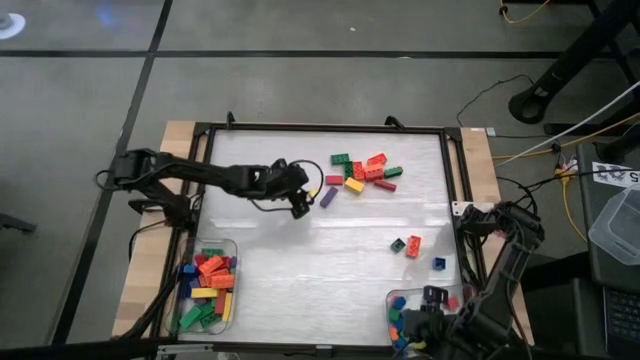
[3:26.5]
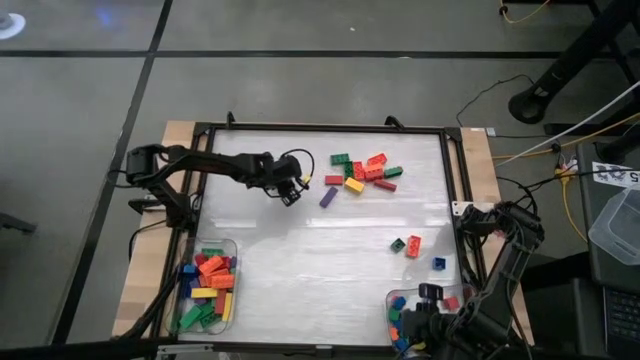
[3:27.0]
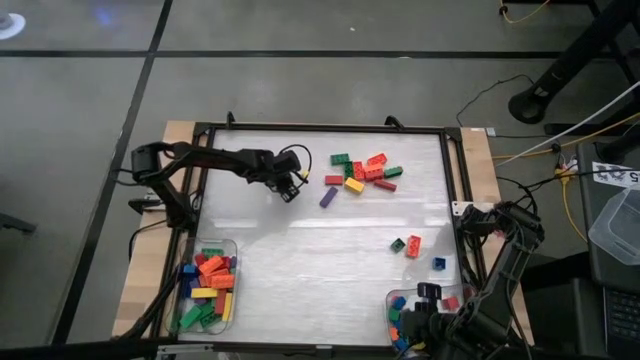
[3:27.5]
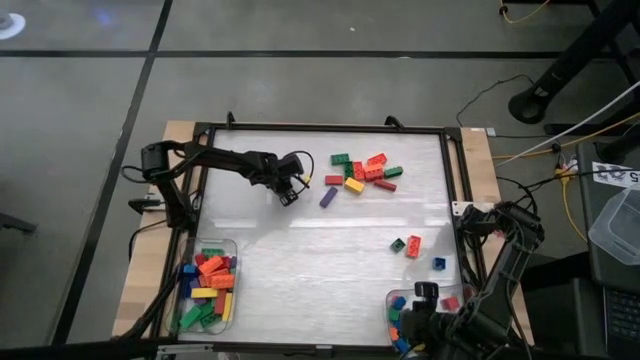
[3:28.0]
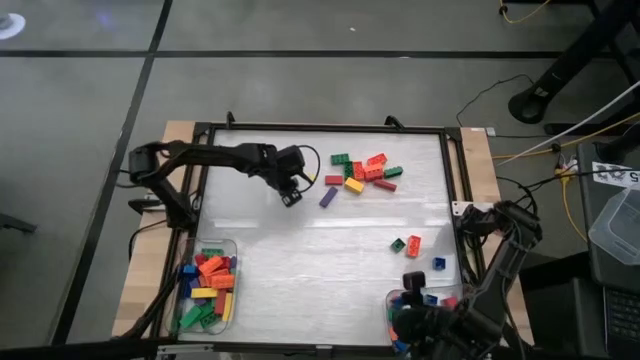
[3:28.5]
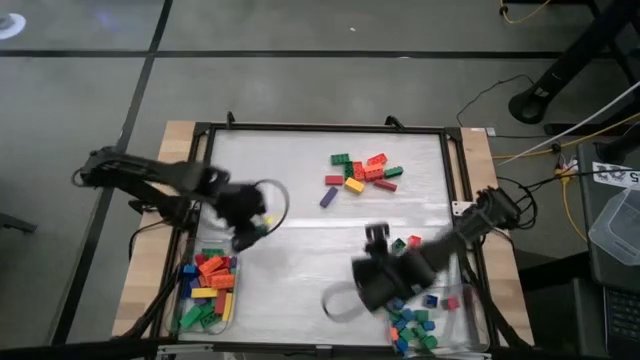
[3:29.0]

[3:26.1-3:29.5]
Task: Sort blocks by size
Put the large green game piece into the left transparent bin

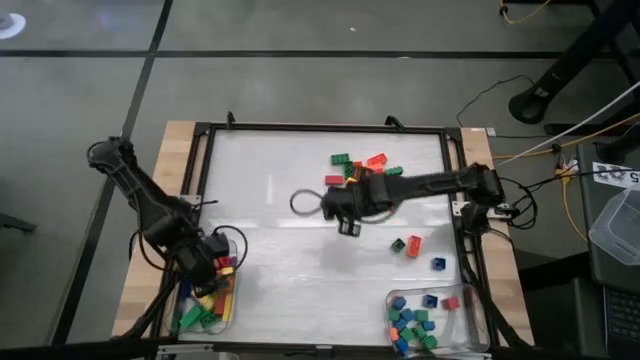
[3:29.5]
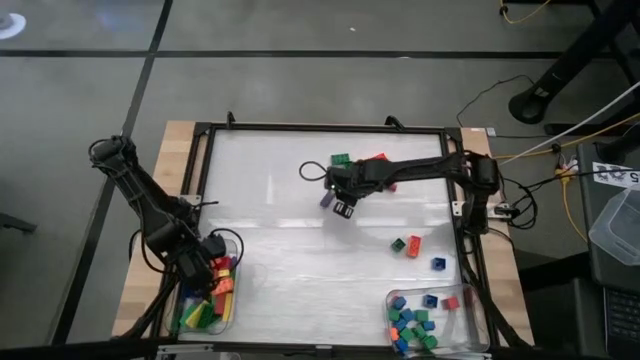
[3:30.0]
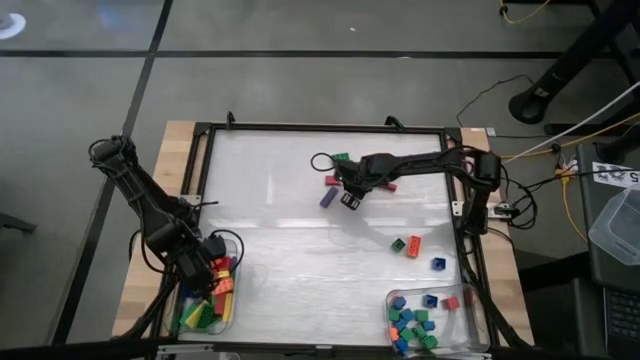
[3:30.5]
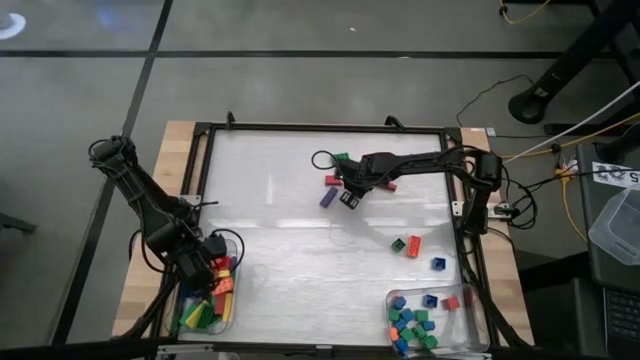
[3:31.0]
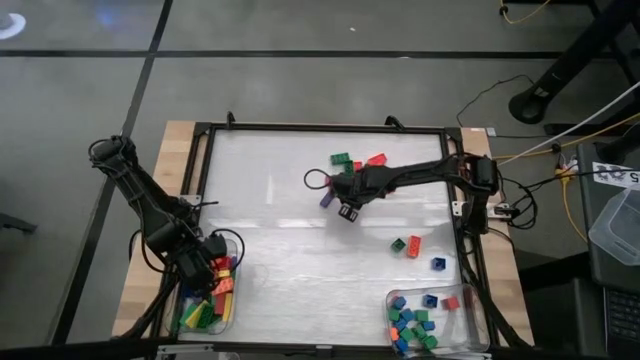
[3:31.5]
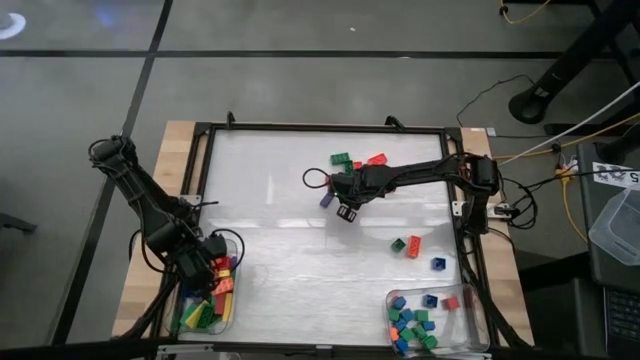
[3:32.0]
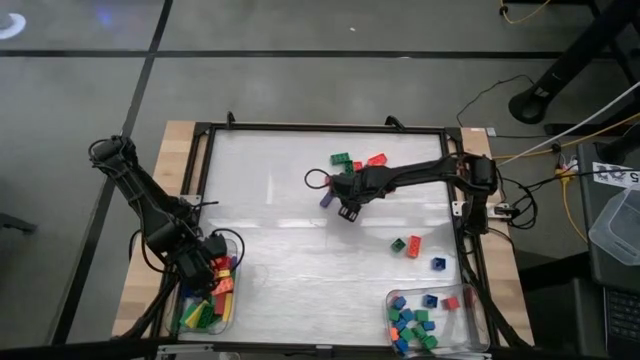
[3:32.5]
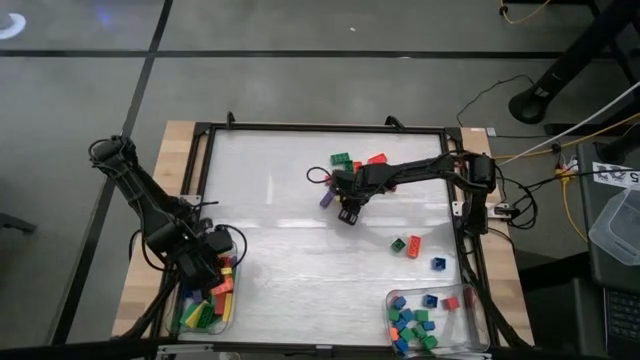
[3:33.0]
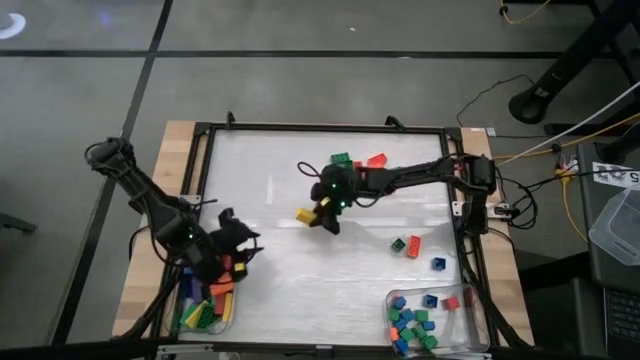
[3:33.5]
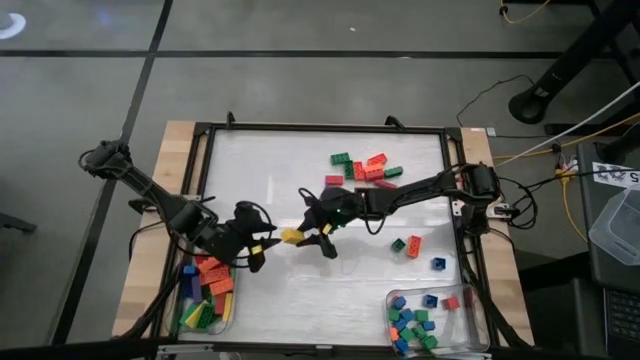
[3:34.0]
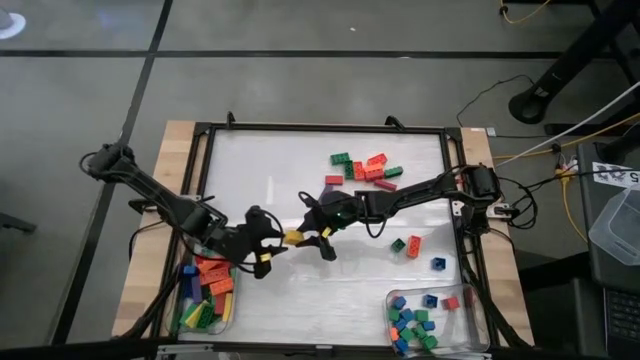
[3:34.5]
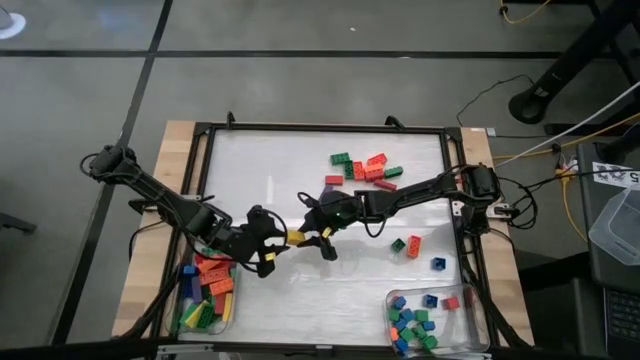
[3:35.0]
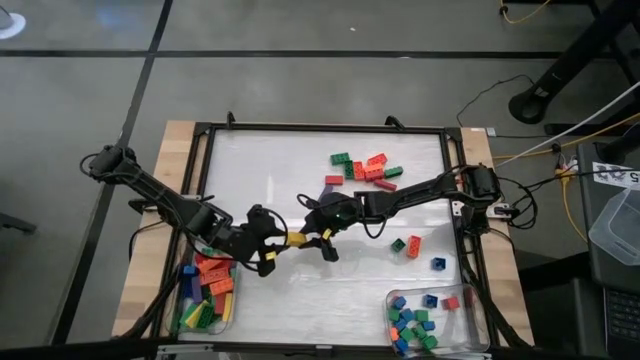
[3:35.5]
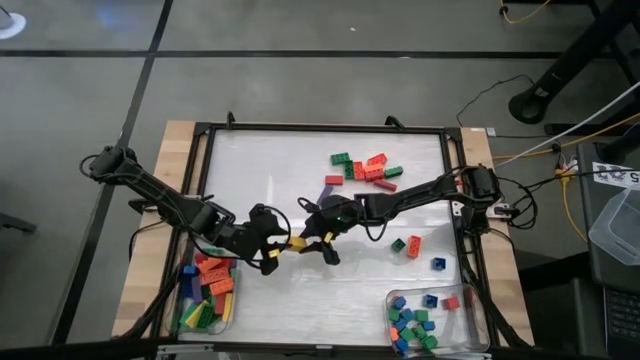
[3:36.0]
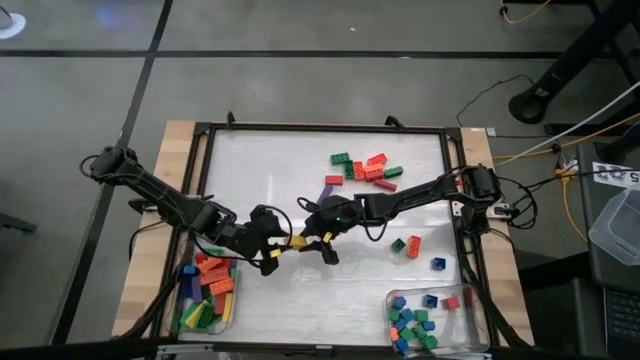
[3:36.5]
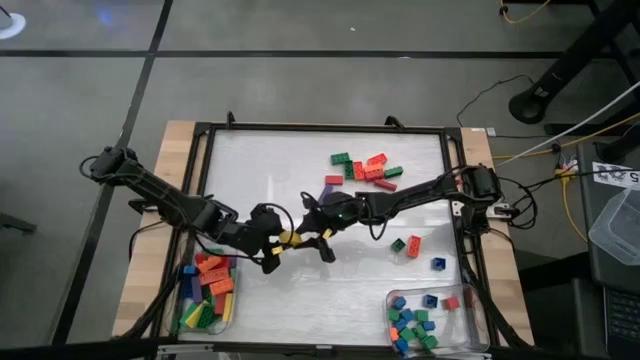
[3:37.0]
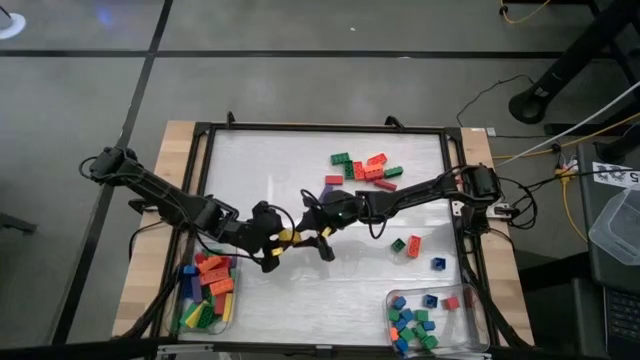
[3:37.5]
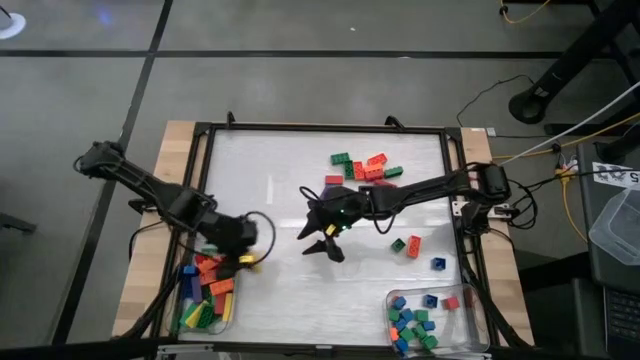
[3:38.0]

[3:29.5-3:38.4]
Put the large yellow block into the left transparent bin

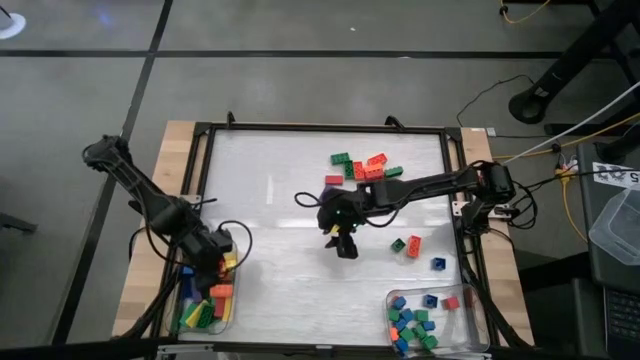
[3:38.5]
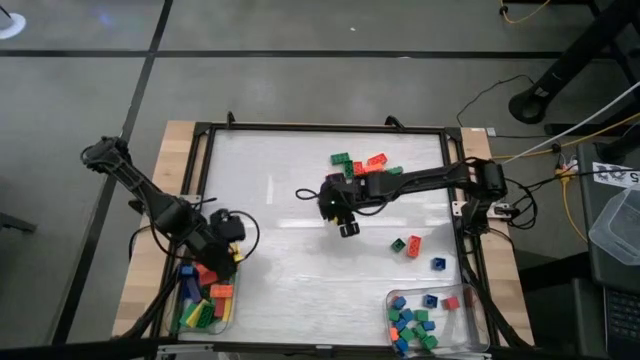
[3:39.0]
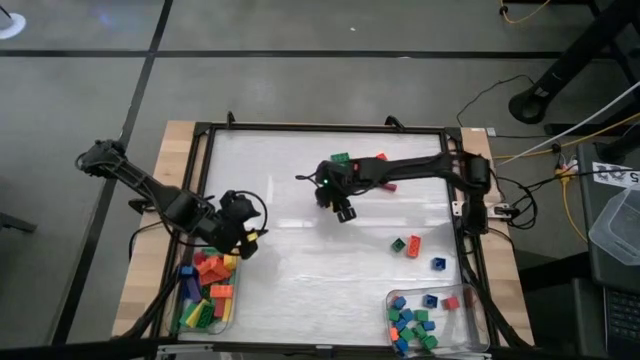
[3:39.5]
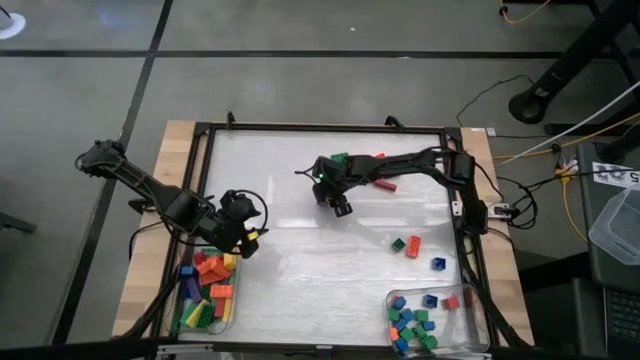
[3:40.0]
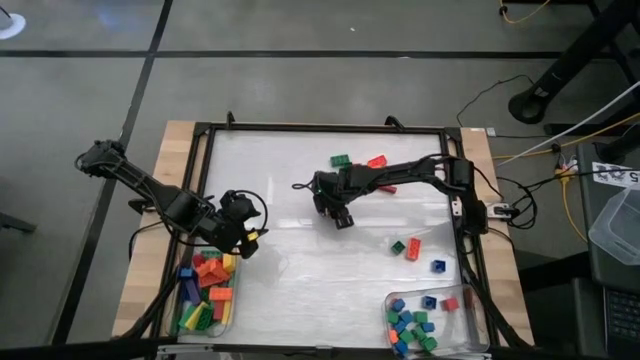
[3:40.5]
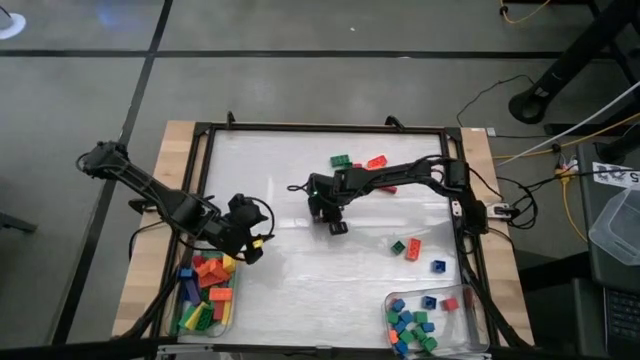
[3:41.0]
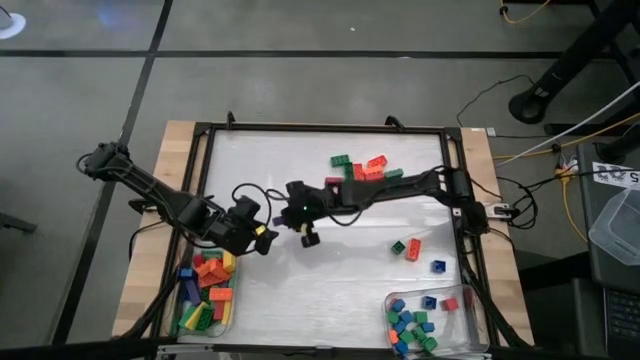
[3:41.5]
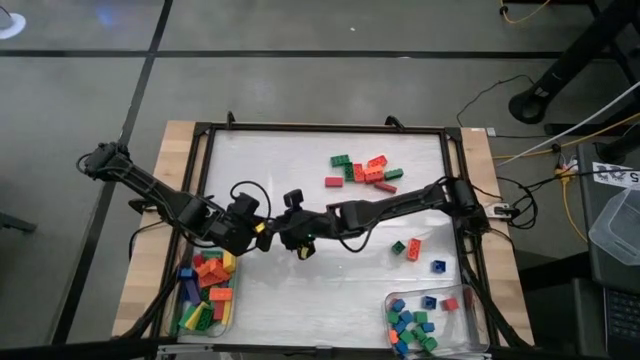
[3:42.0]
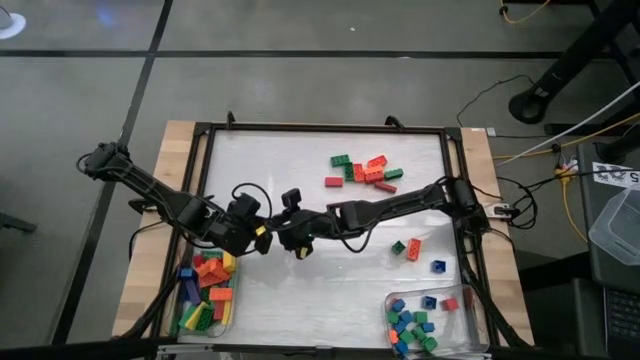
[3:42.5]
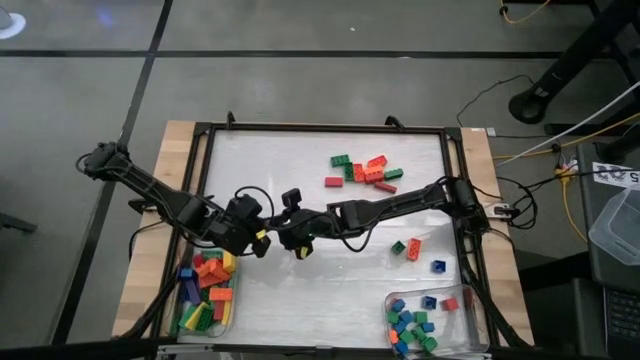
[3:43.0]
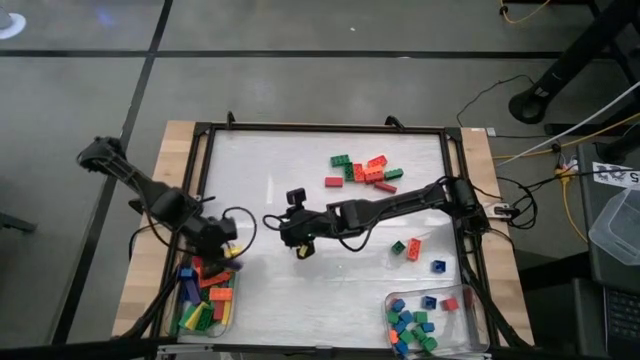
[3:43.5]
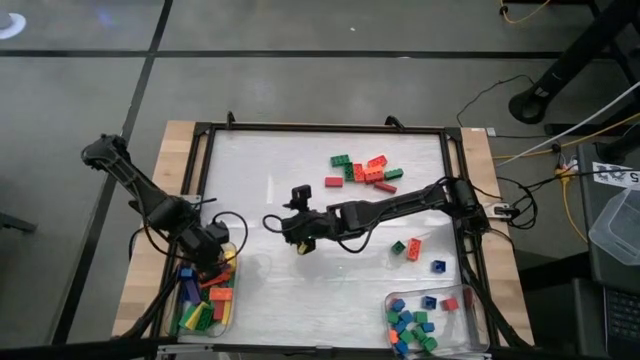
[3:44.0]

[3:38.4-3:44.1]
Put the large violet block into the left transparent bin

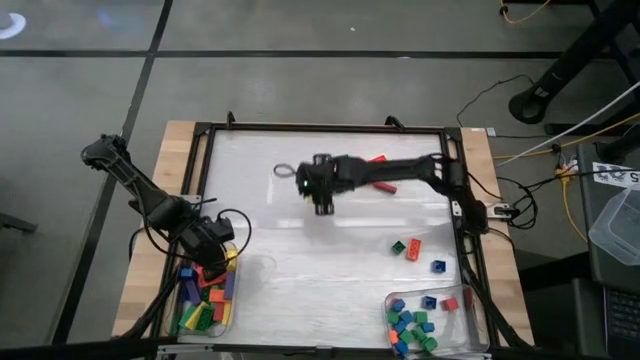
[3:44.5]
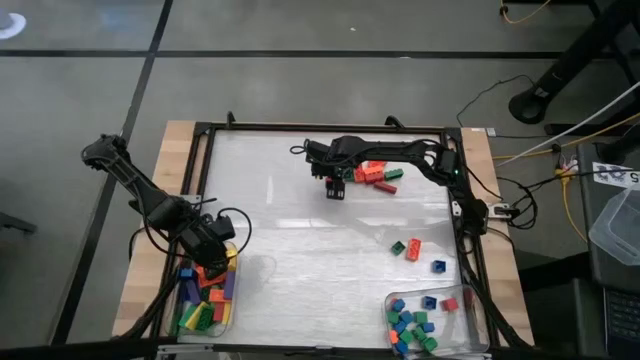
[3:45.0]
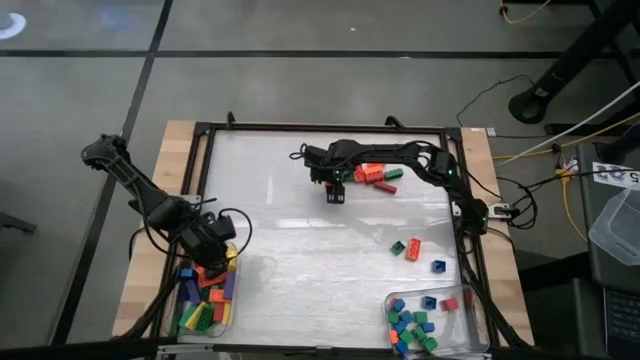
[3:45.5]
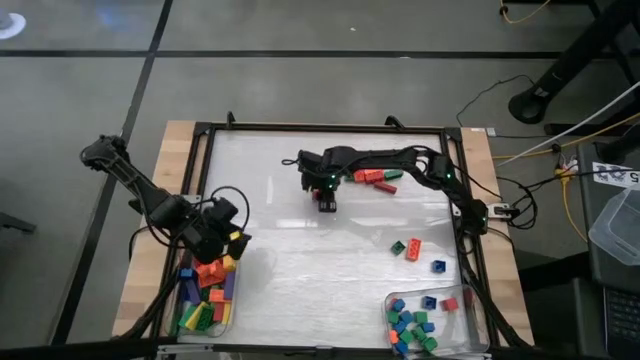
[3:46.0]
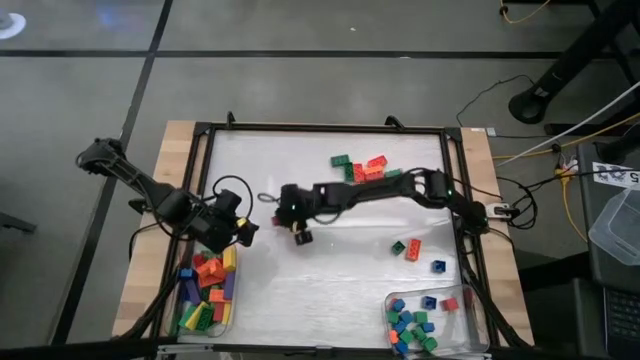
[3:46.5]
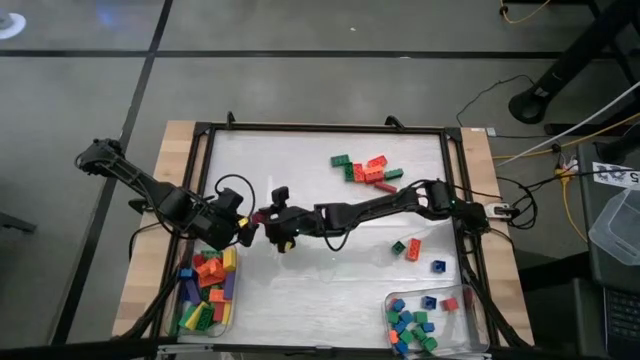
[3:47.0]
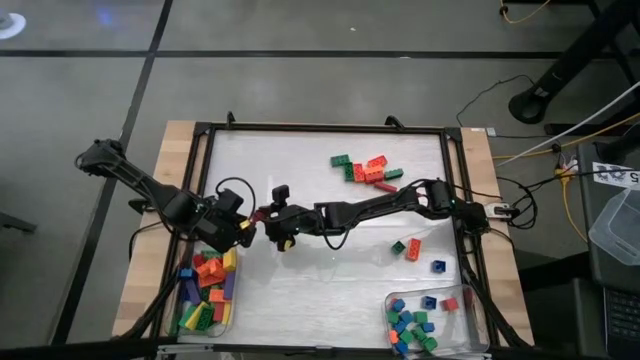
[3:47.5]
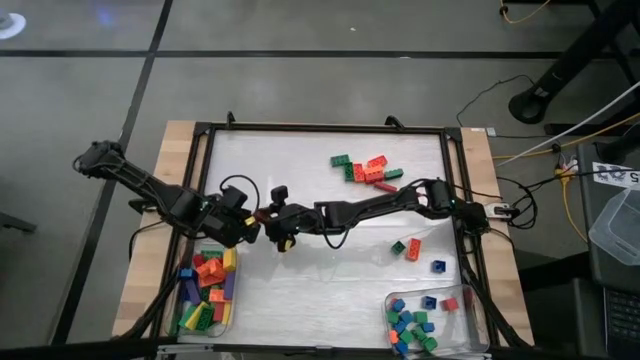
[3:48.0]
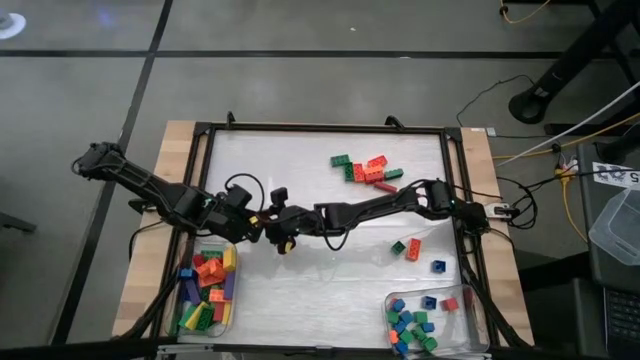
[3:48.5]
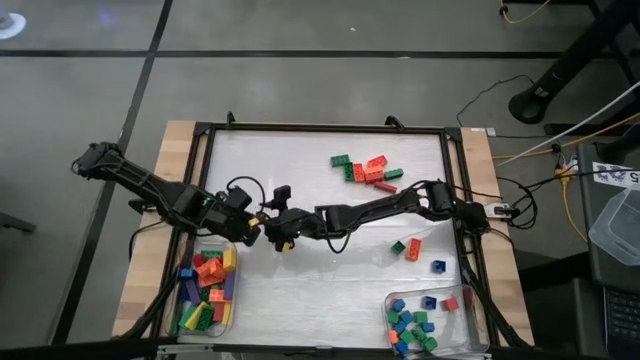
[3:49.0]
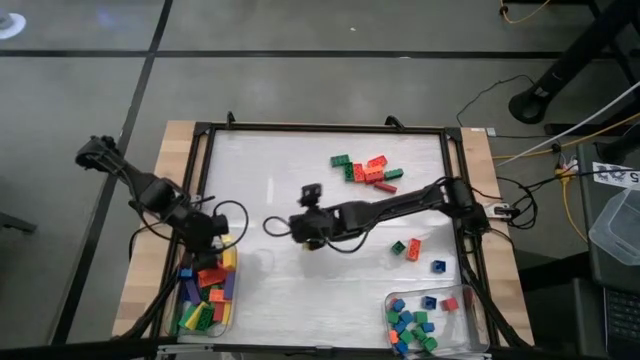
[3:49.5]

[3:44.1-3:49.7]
Put the large red block into the left transparent bin
